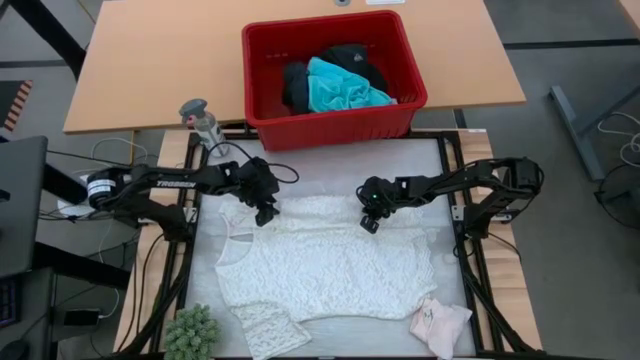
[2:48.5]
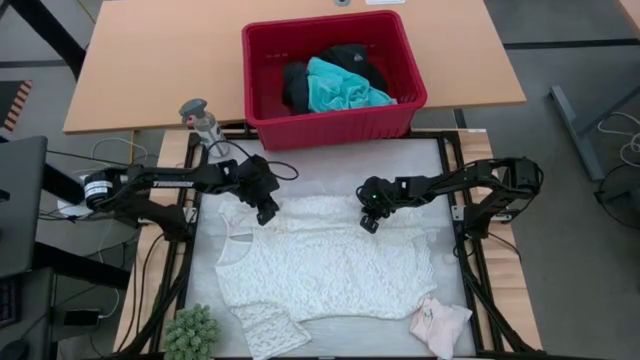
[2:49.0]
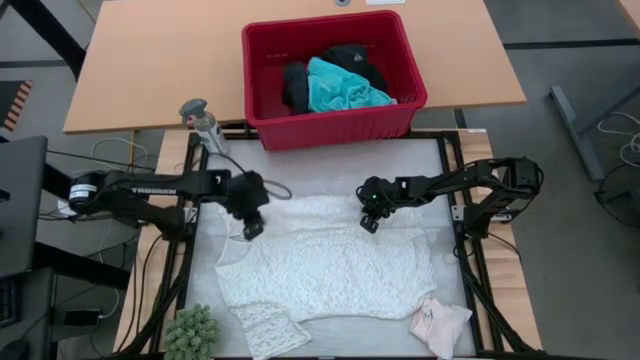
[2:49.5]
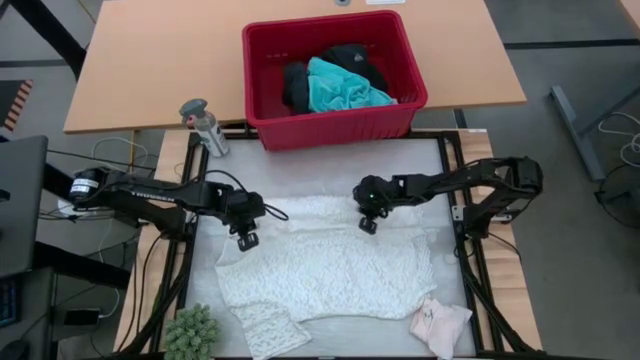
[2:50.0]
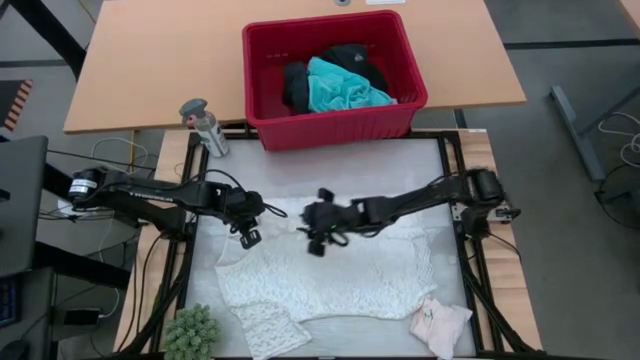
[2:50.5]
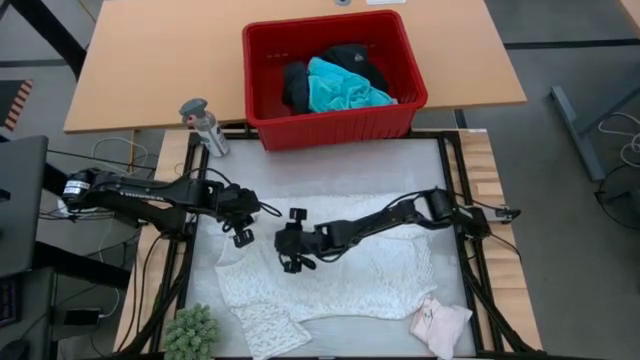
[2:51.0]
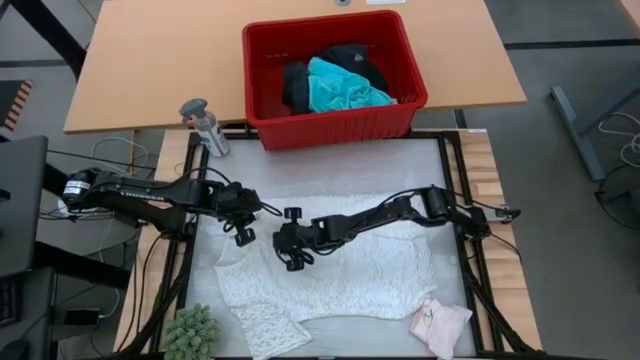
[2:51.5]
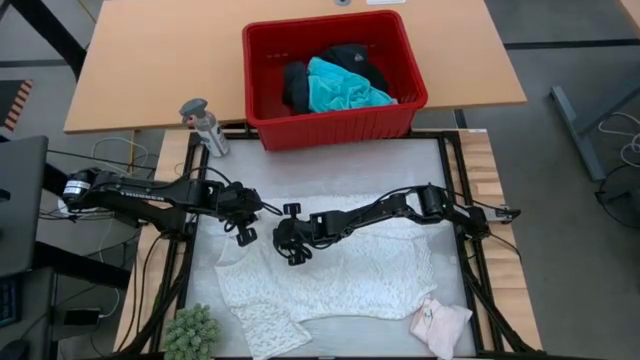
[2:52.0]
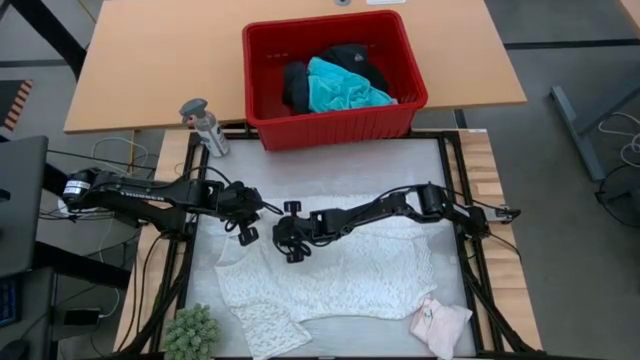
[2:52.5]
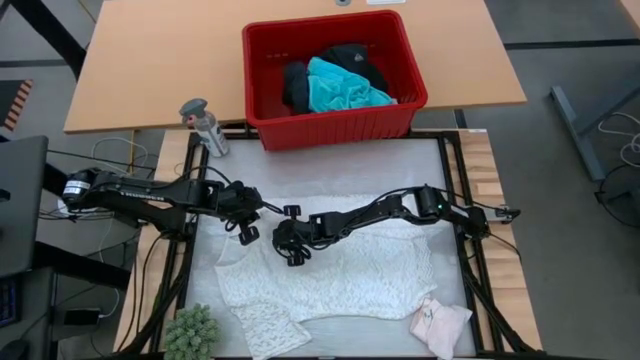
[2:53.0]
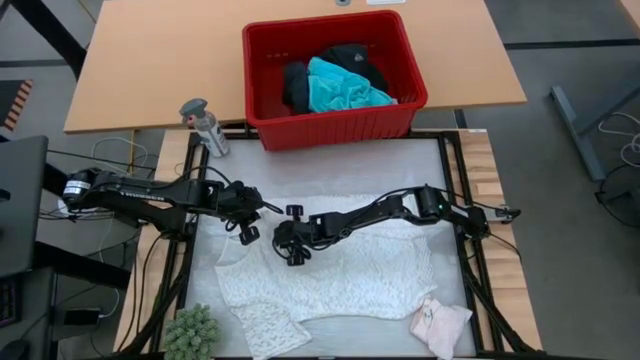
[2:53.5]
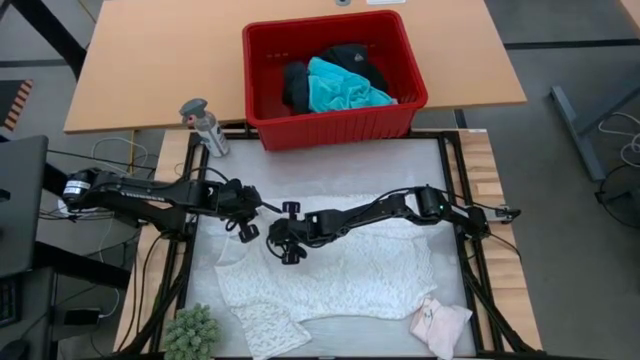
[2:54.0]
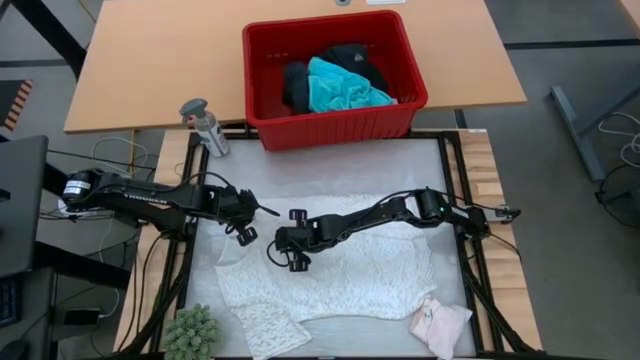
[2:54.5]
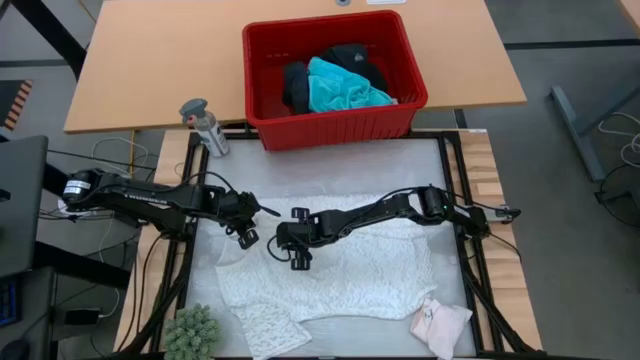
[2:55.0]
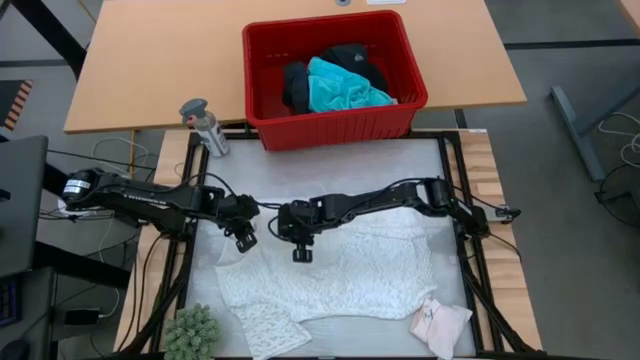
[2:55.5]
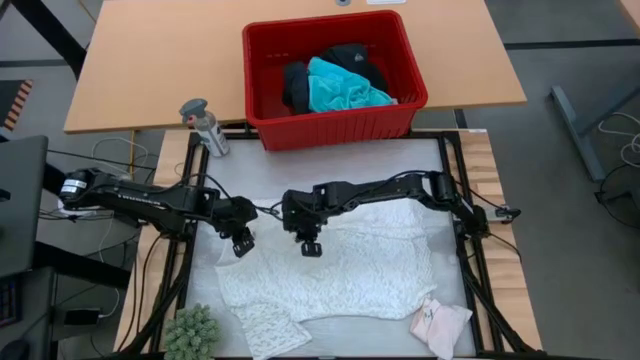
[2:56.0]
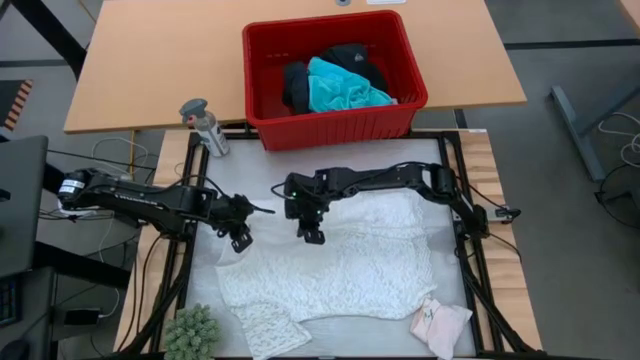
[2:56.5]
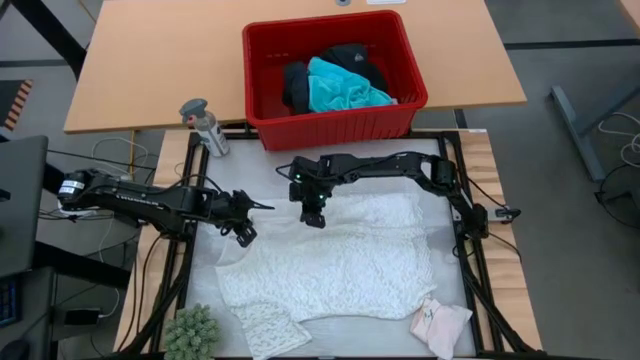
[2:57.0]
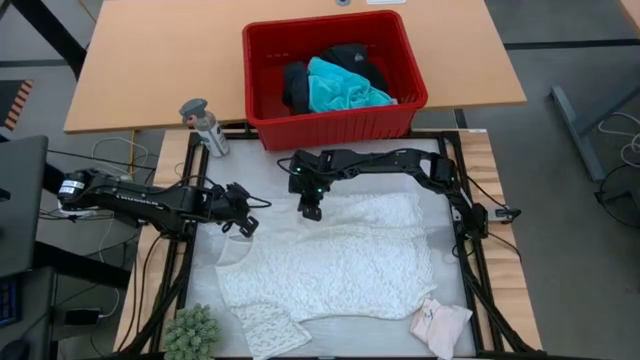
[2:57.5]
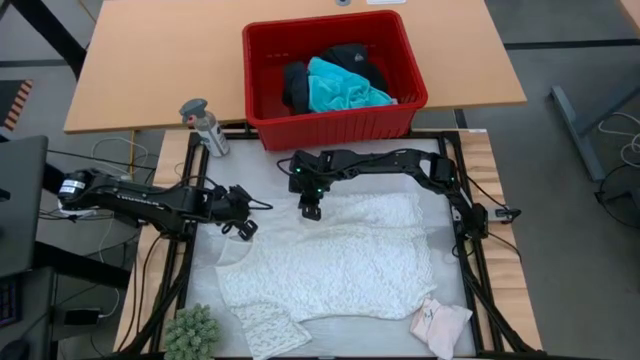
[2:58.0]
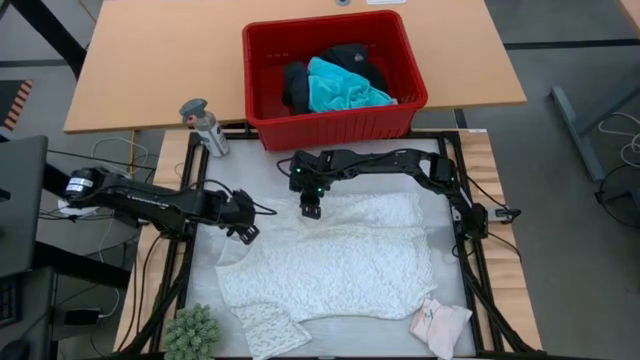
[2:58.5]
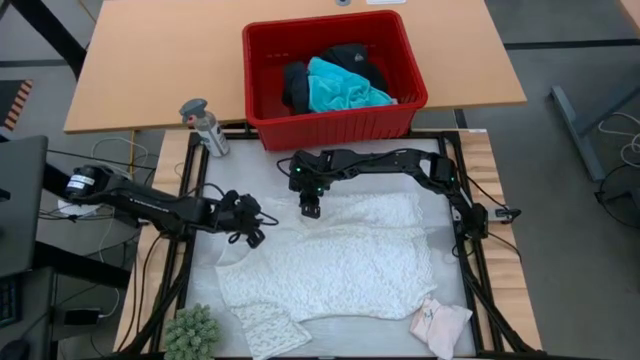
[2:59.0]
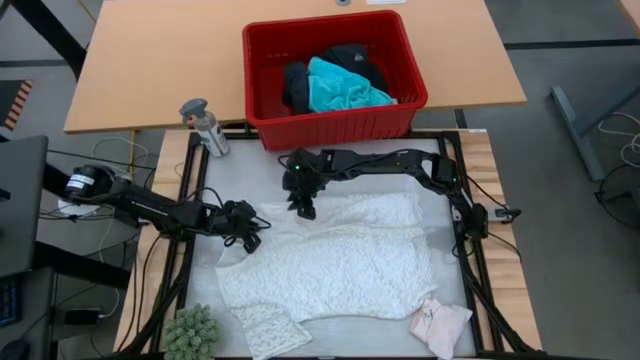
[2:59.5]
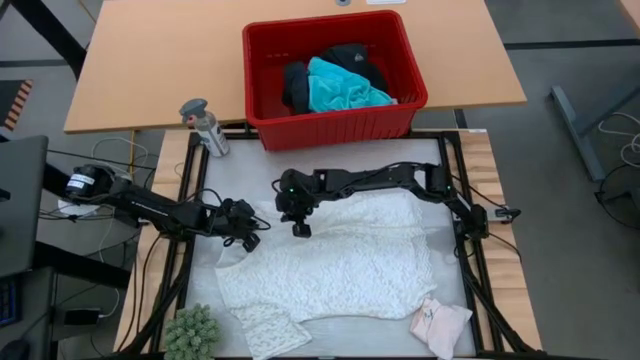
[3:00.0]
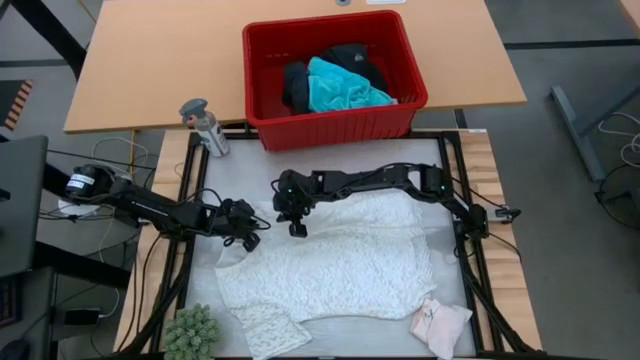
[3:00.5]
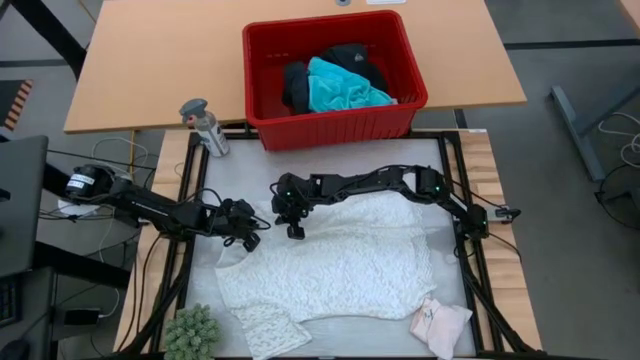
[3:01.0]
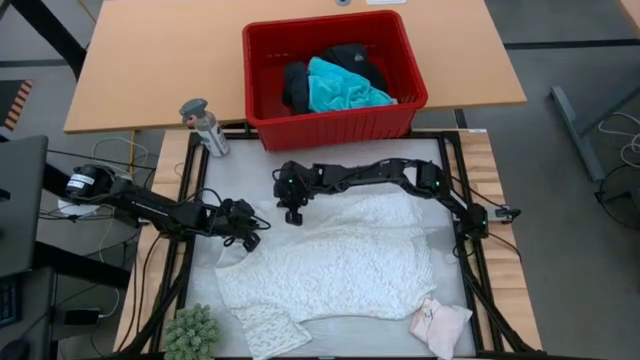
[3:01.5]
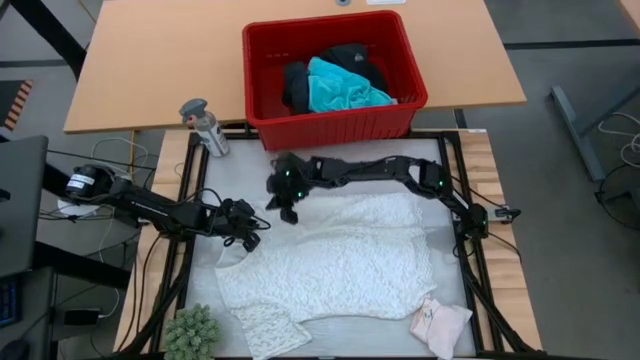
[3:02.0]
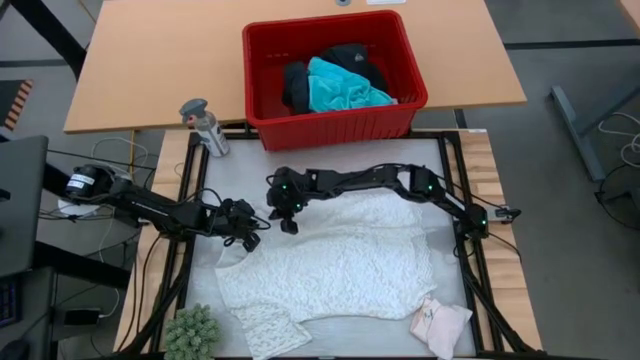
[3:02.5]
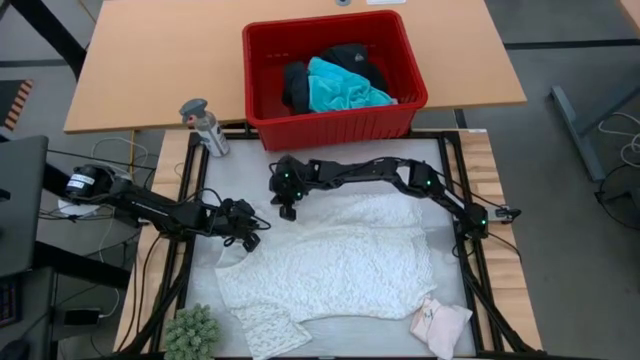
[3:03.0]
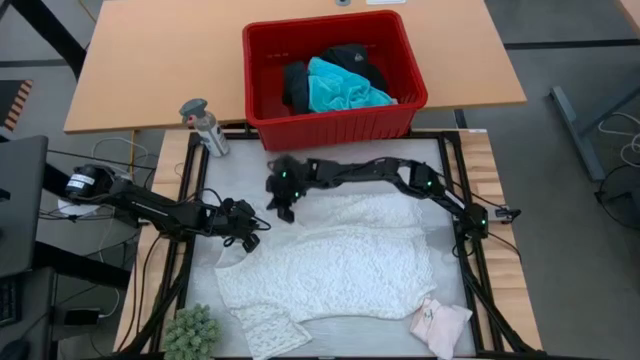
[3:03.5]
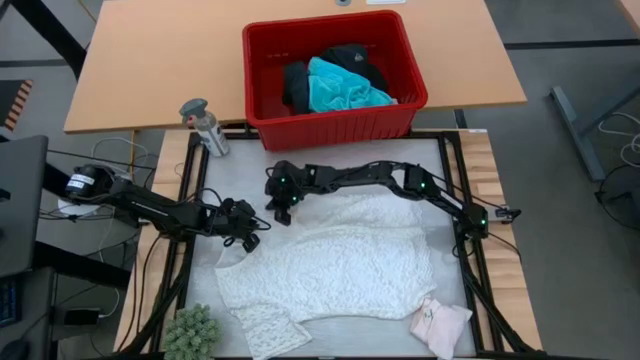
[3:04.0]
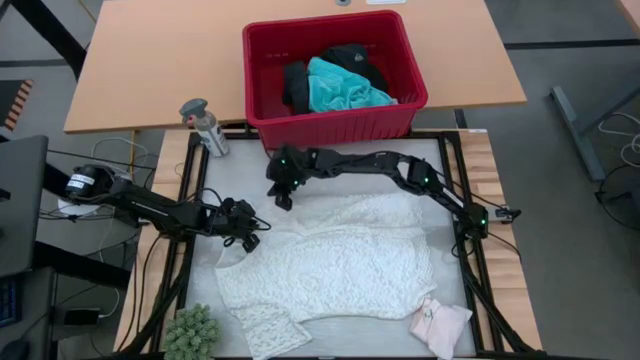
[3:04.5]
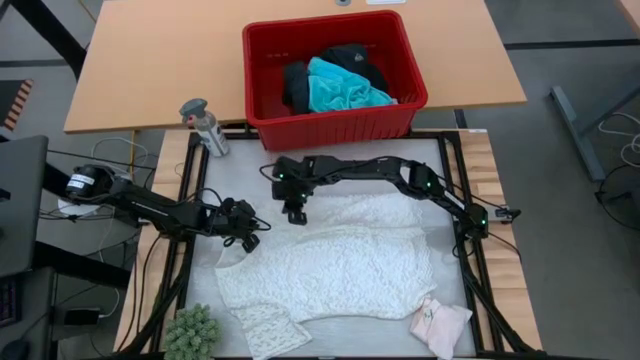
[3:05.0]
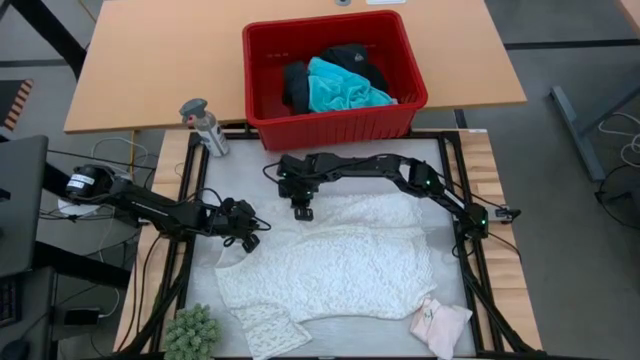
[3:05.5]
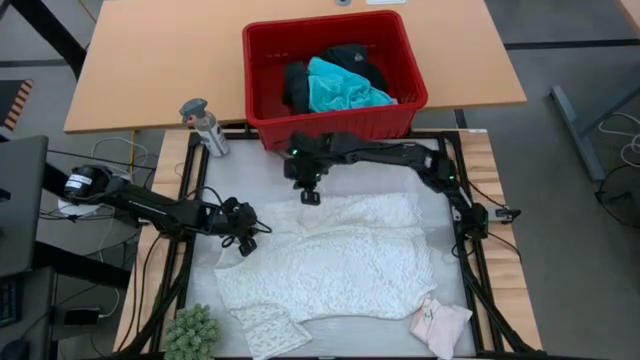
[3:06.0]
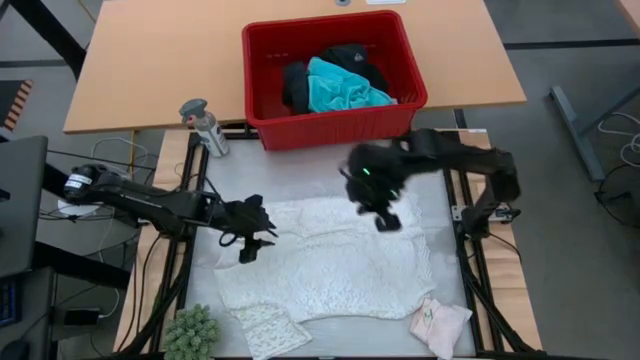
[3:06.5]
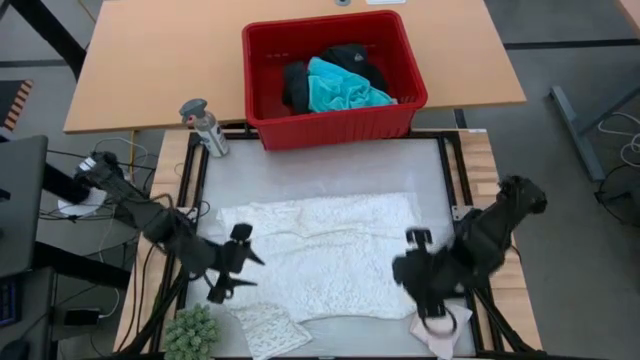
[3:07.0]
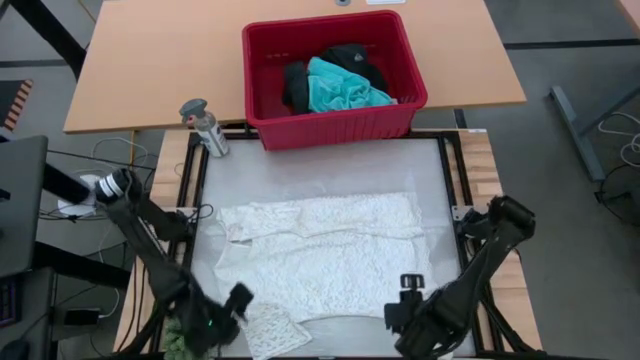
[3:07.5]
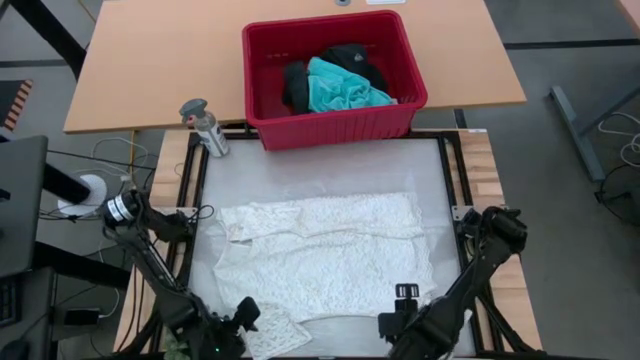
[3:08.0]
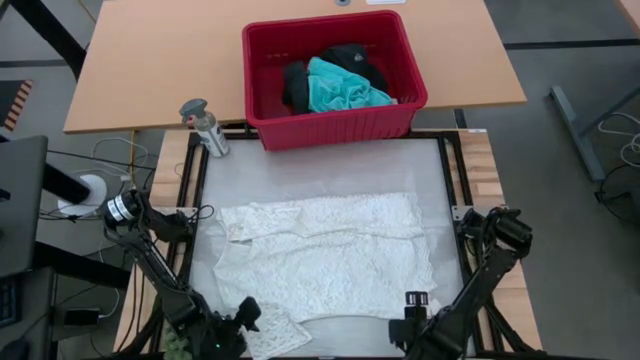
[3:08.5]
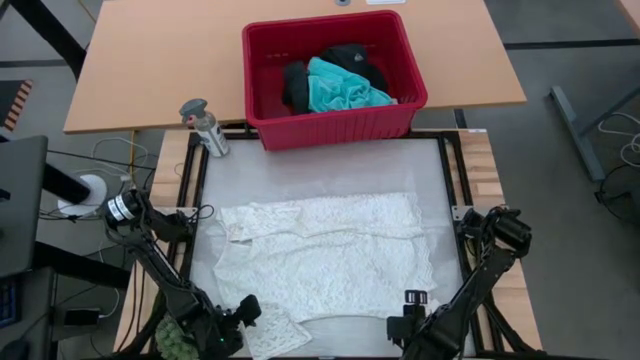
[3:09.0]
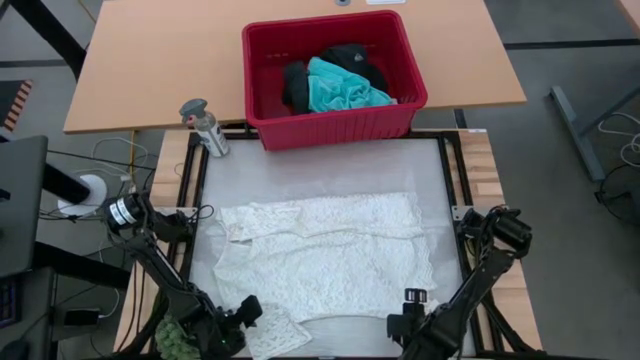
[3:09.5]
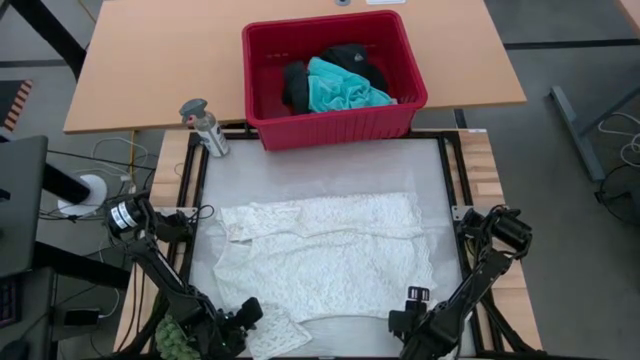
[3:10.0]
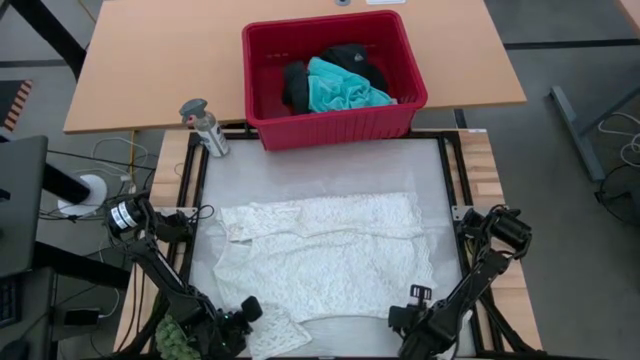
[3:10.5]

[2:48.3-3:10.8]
Task: Fold Laundry from Bin
Fold the white blouse

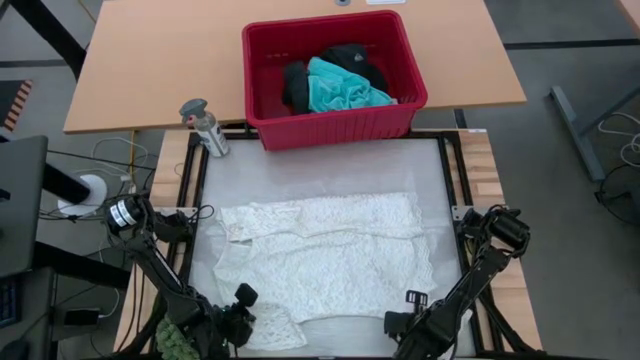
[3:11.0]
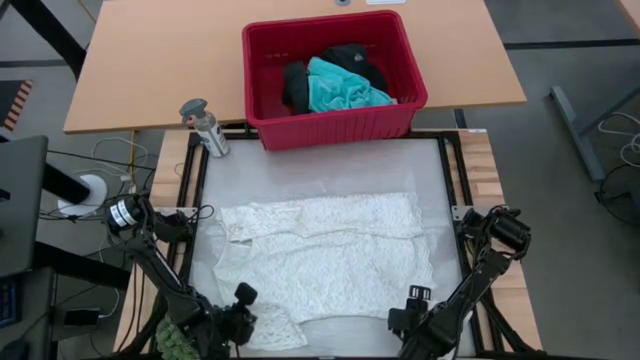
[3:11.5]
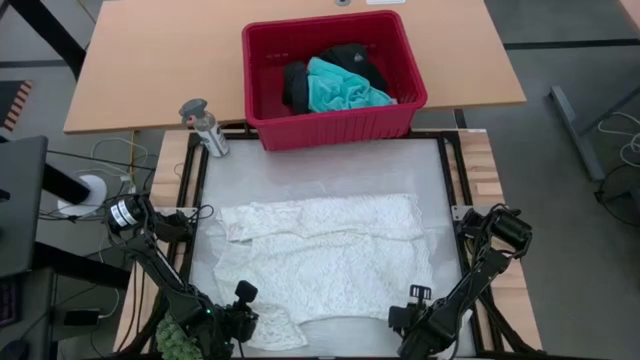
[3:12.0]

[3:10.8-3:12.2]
Fold the white blouse
